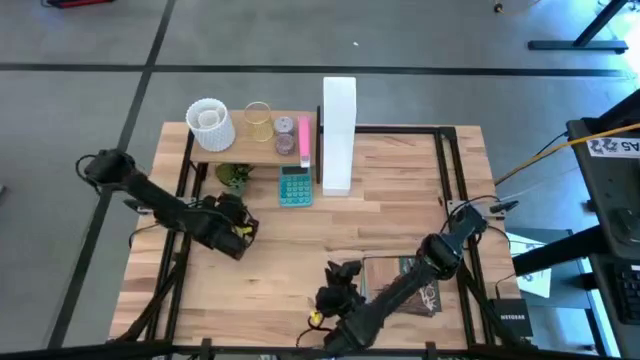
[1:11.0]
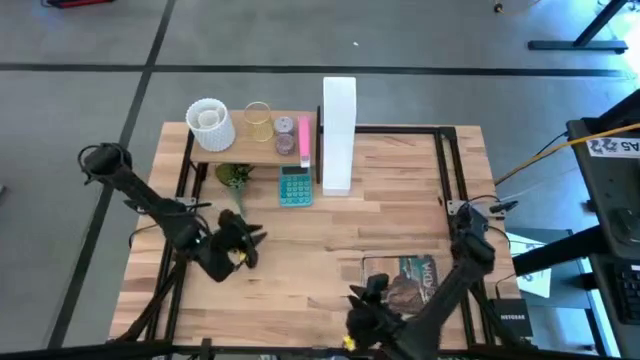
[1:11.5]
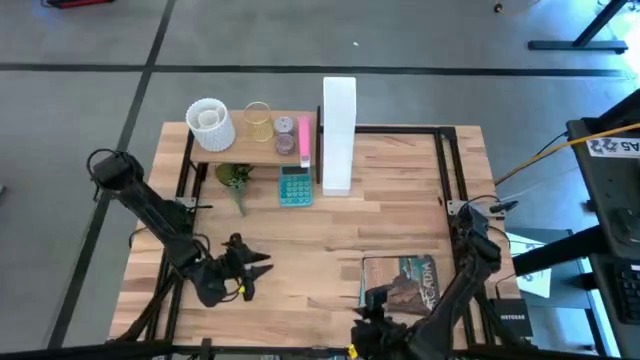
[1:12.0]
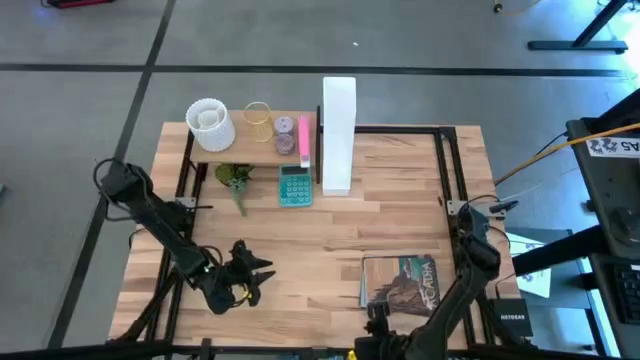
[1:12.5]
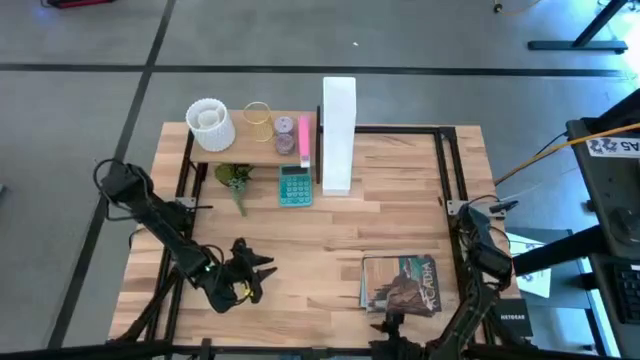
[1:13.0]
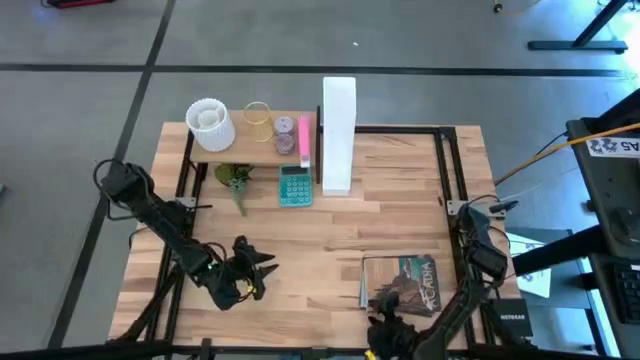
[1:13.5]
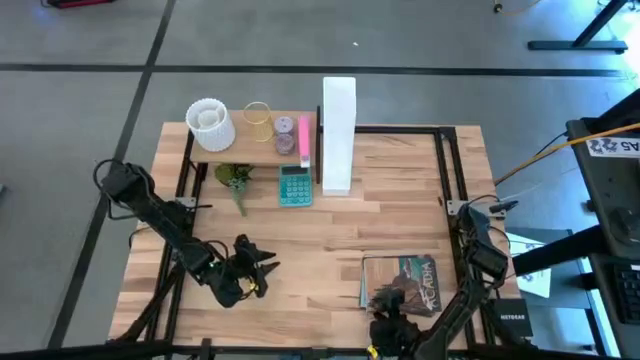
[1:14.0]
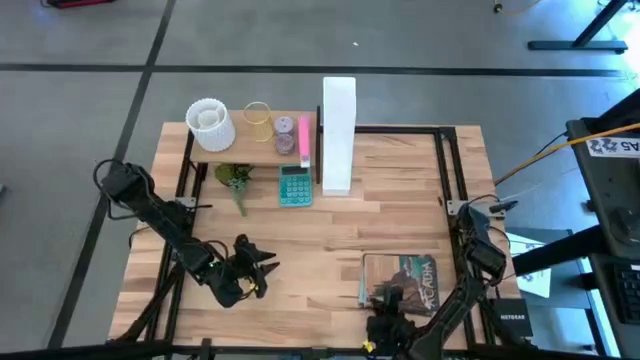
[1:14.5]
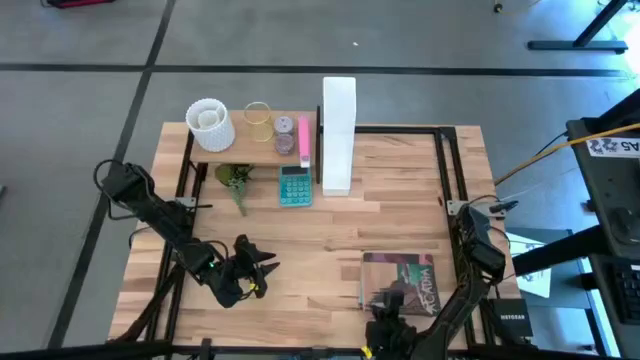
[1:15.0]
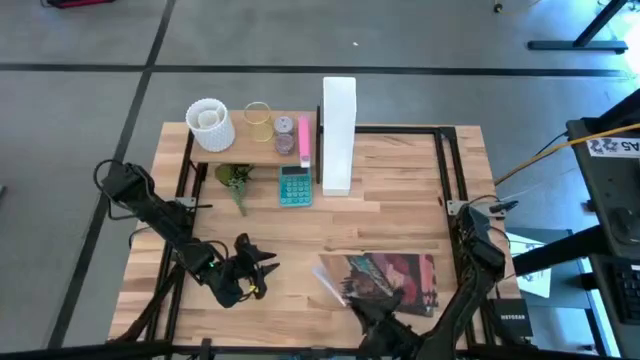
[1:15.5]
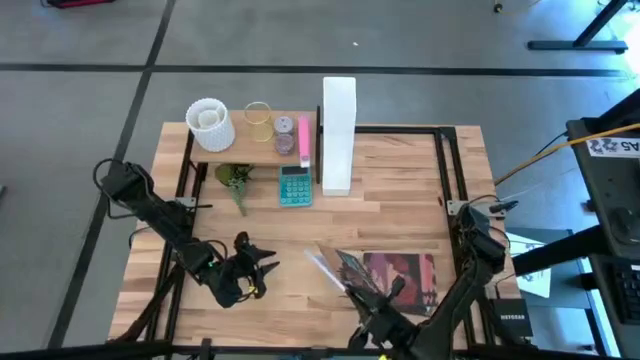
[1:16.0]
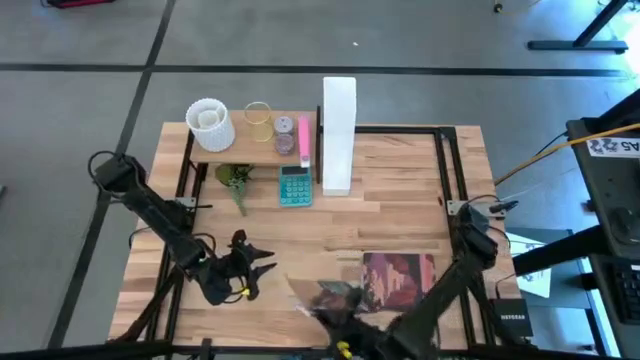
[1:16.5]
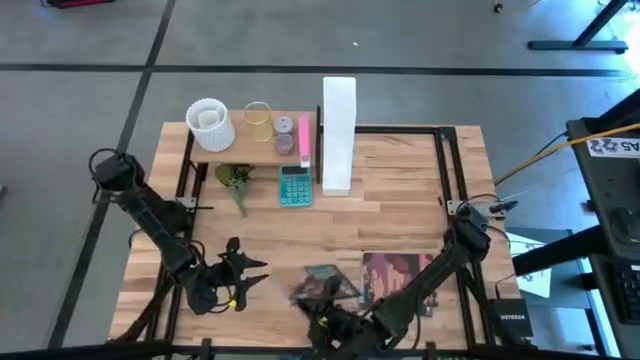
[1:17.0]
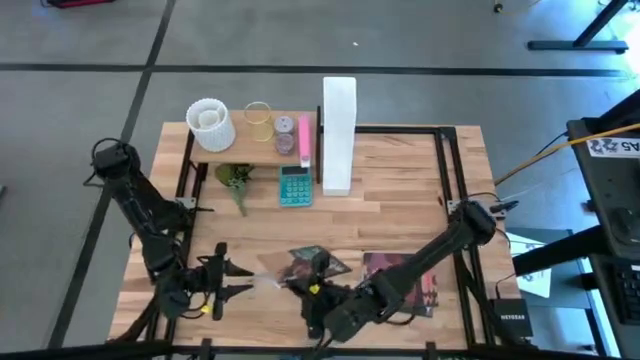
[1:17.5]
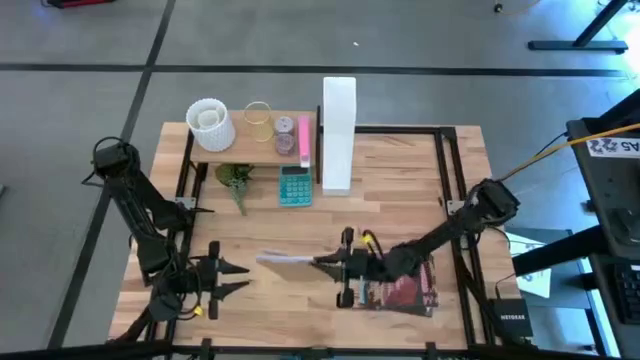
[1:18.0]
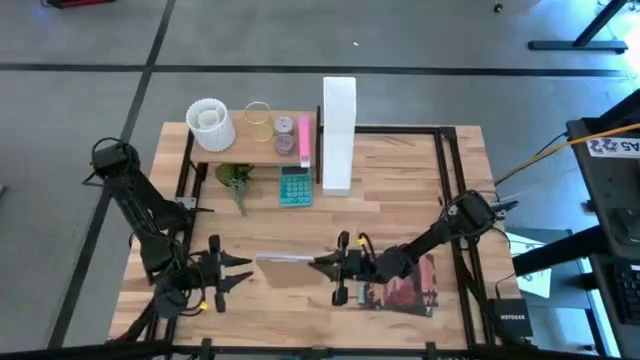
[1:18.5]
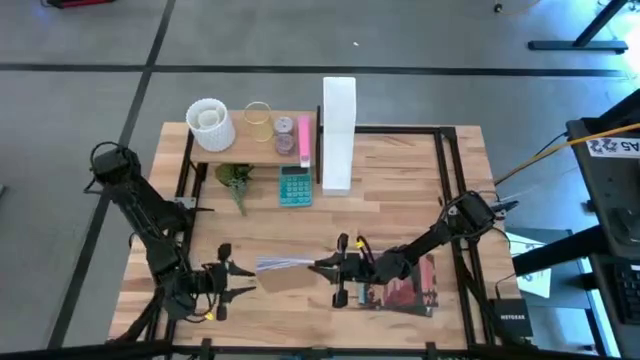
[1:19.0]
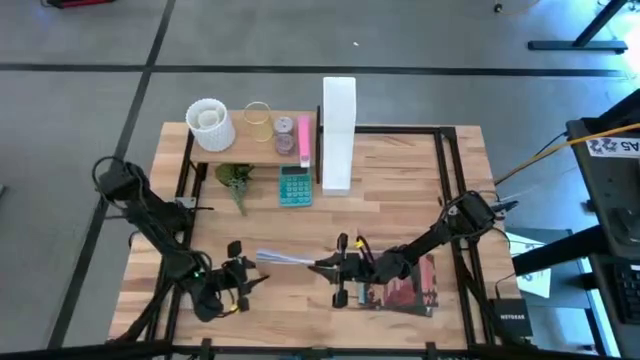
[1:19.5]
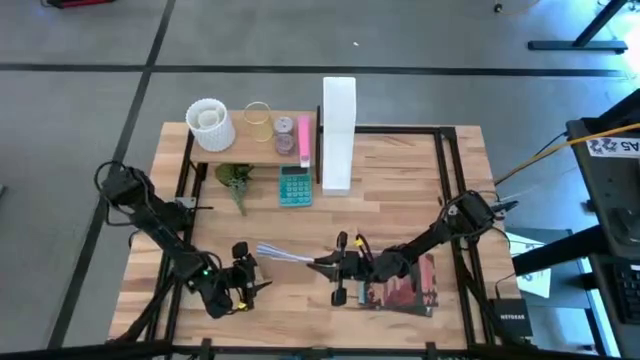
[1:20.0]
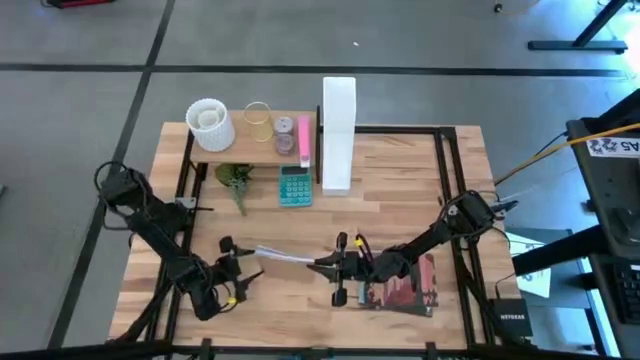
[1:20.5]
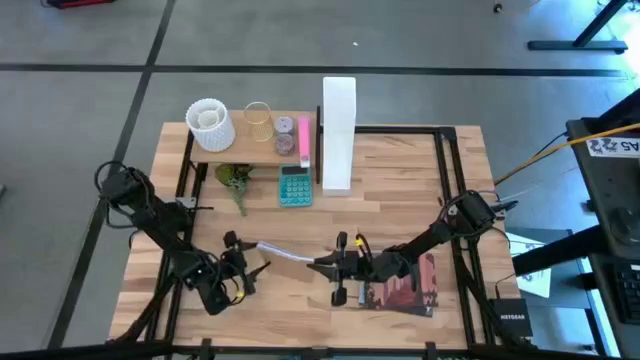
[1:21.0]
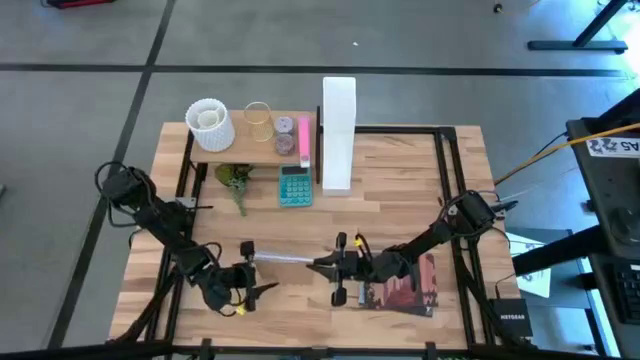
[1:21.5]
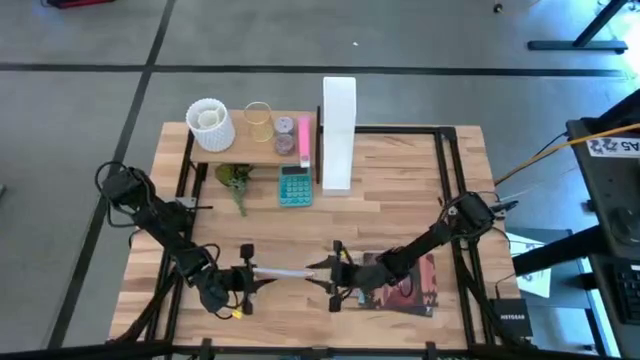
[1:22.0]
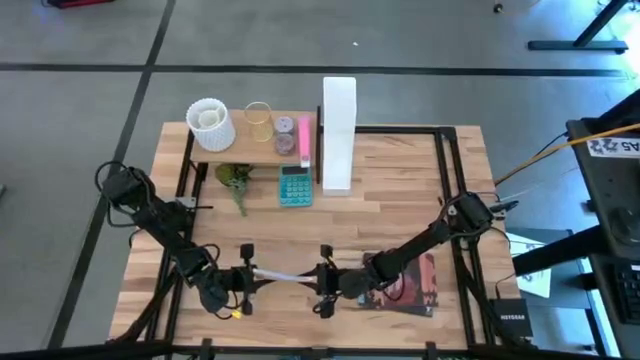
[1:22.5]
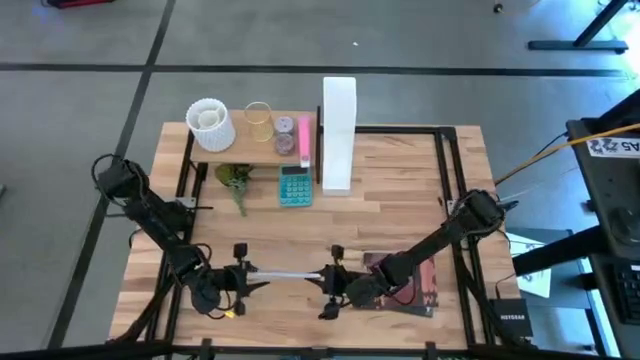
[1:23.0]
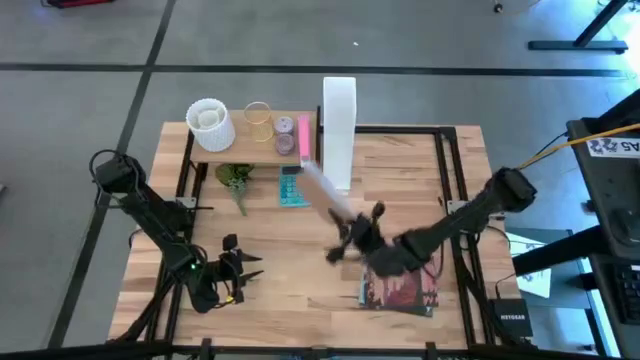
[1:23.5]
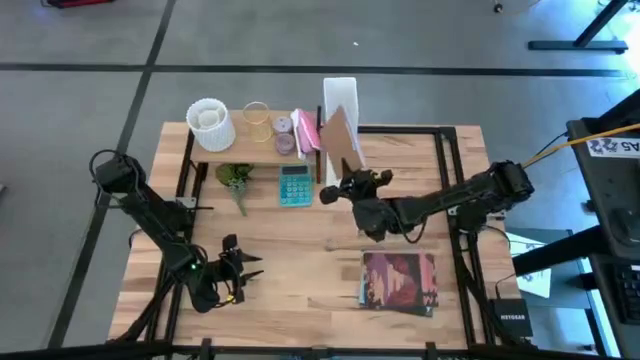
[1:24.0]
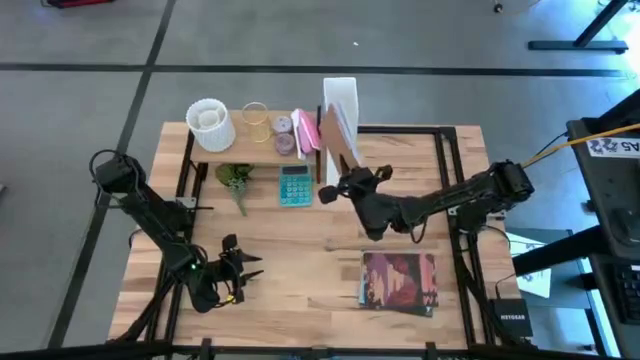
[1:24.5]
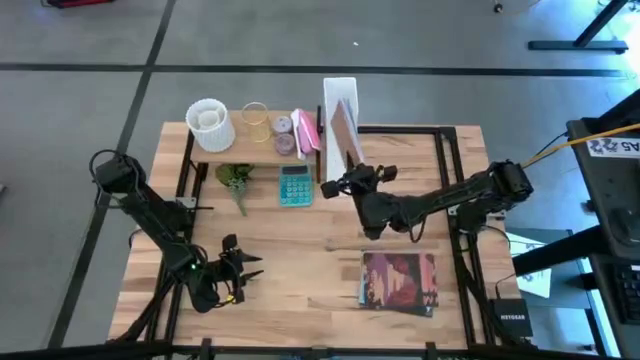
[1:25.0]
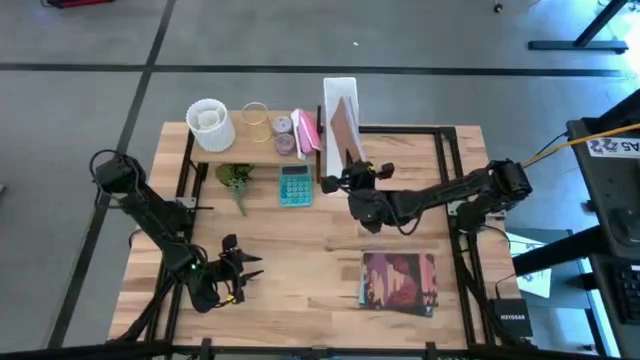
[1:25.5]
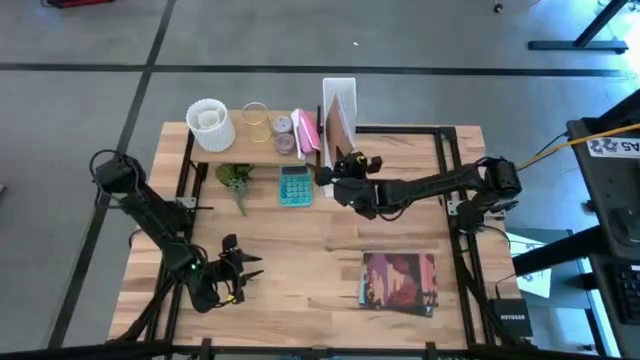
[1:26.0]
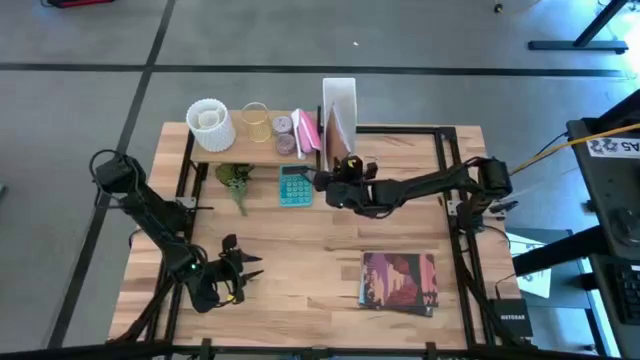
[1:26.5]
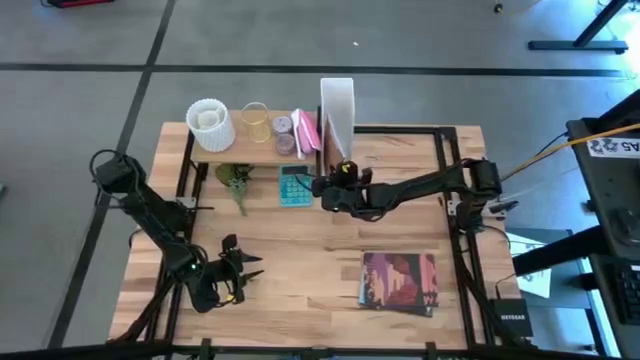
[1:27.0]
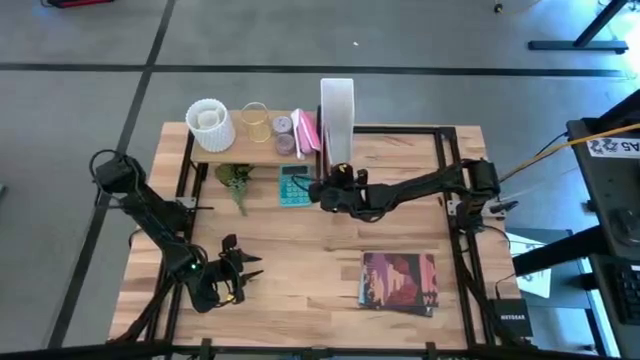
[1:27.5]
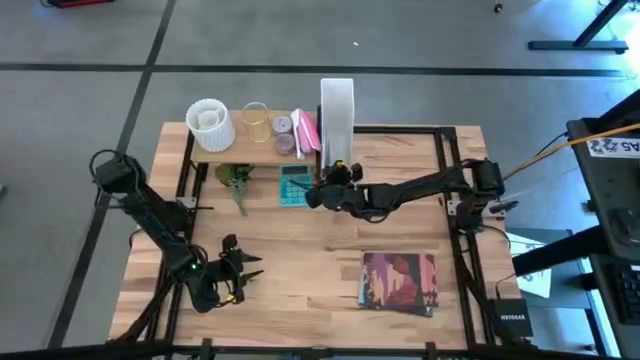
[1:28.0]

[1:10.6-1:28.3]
Task: Stock shelves
Put the brown book into the white bookshelf

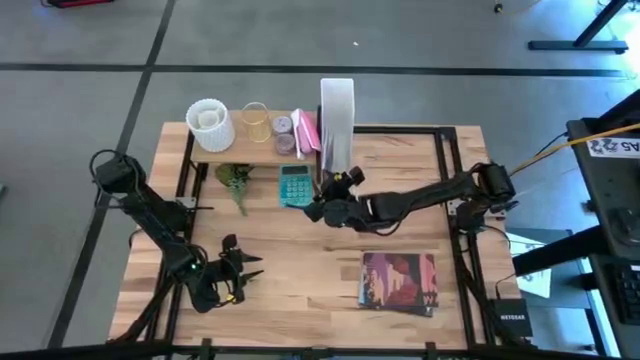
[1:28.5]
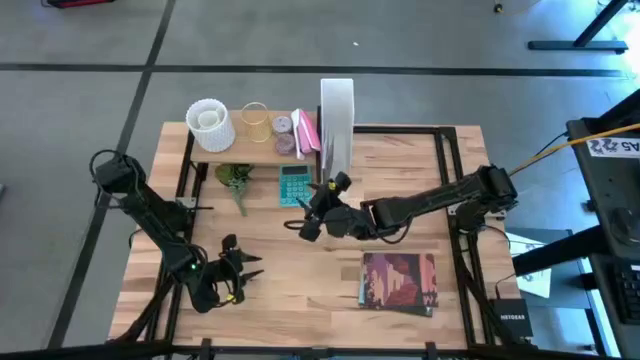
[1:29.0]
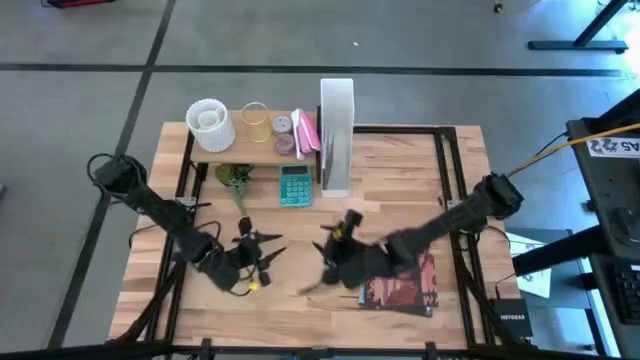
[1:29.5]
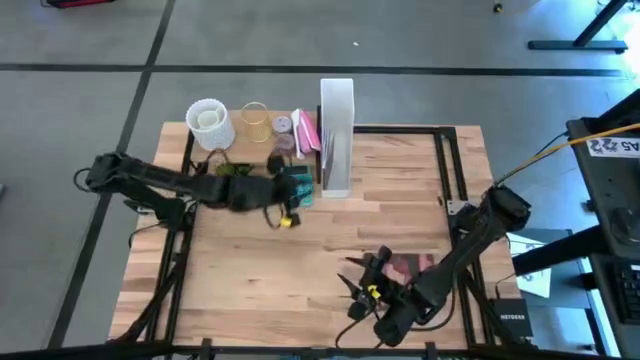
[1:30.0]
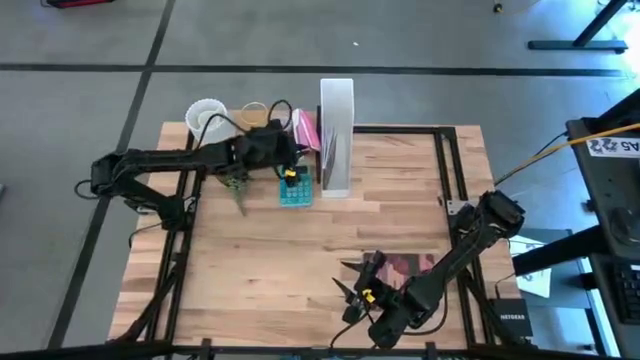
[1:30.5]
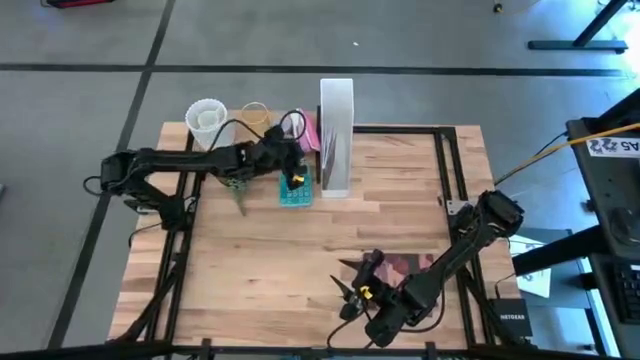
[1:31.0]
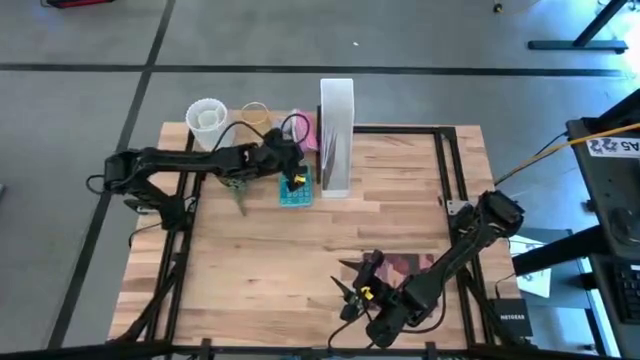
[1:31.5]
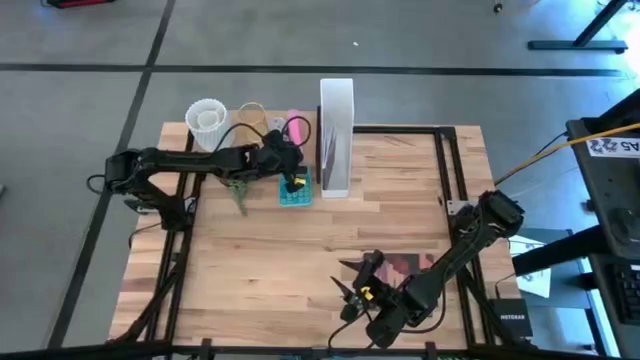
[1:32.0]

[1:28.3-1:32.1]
Adjust the pink stapler on the shelf

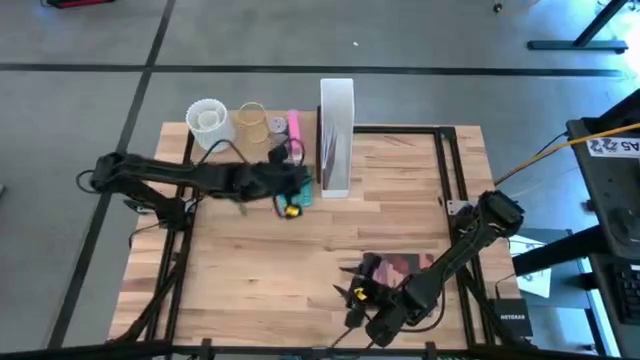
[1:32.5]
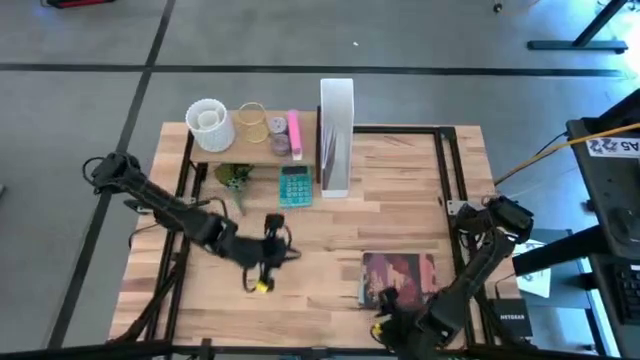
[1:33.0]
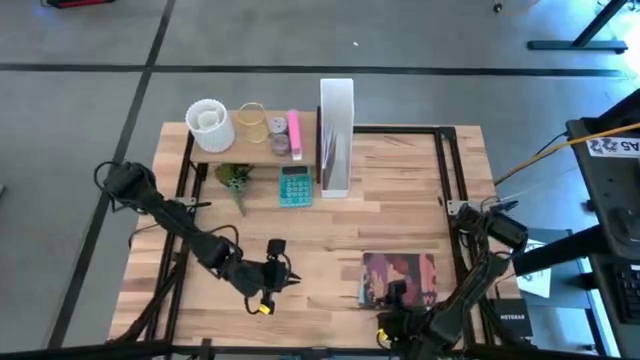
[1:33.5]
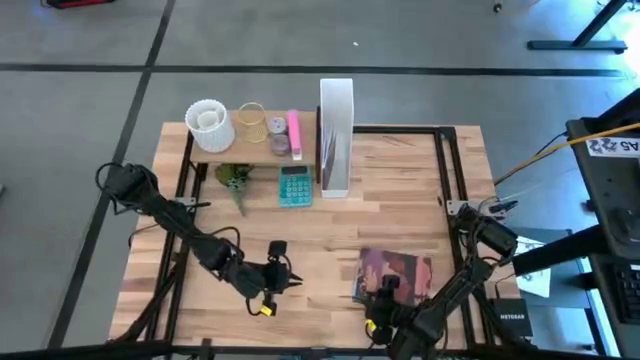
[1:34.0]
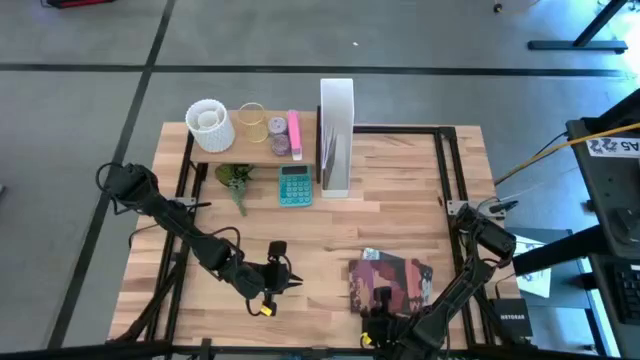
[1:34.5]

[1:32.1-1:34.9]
Put the purple book into the white bookshelf
